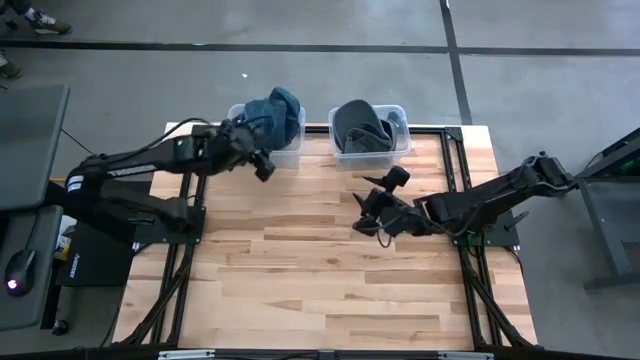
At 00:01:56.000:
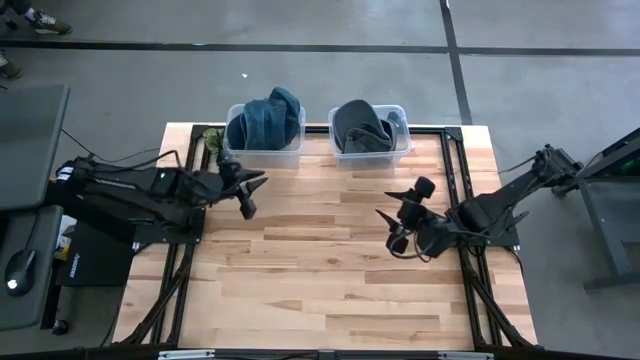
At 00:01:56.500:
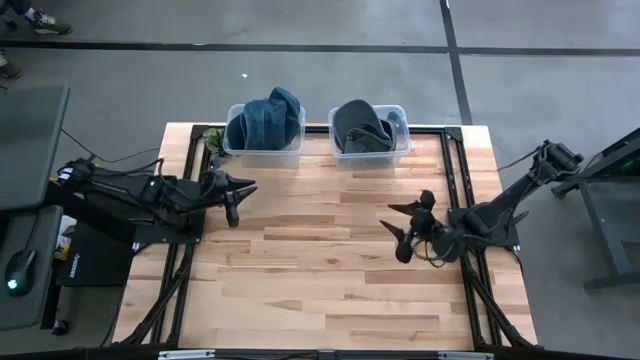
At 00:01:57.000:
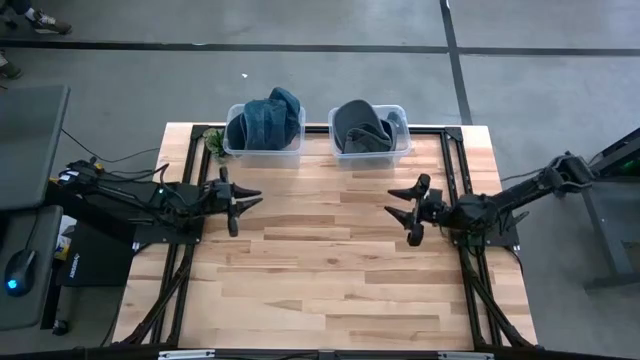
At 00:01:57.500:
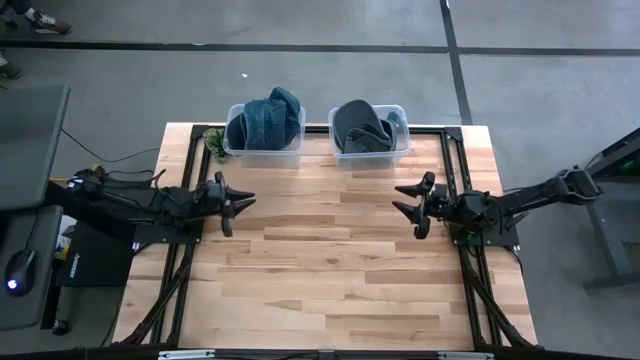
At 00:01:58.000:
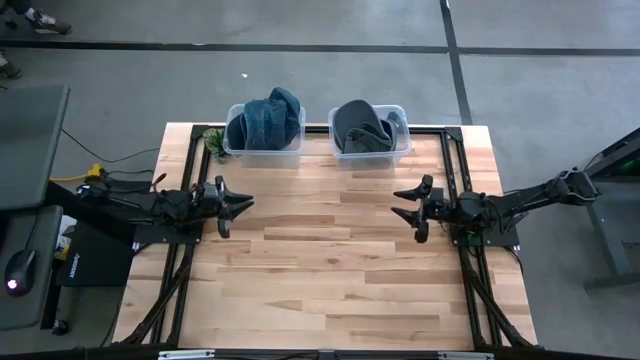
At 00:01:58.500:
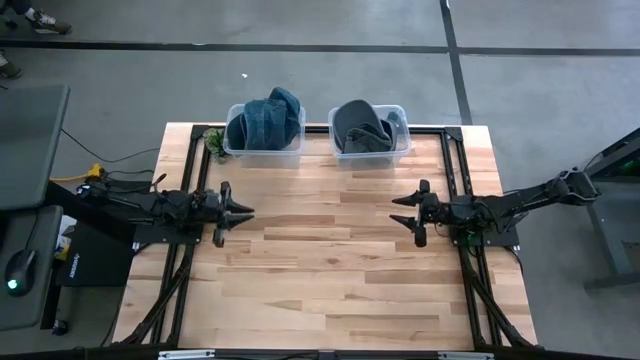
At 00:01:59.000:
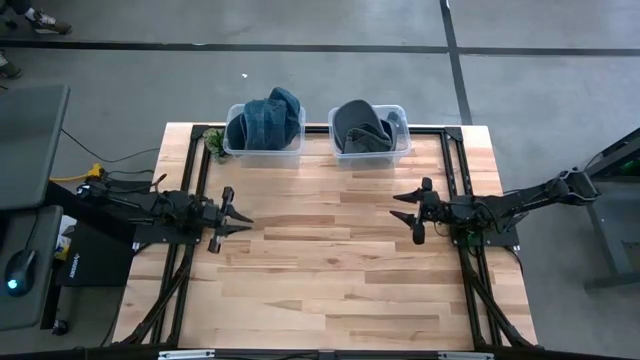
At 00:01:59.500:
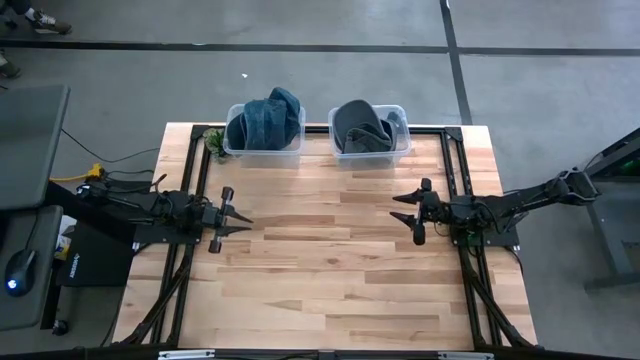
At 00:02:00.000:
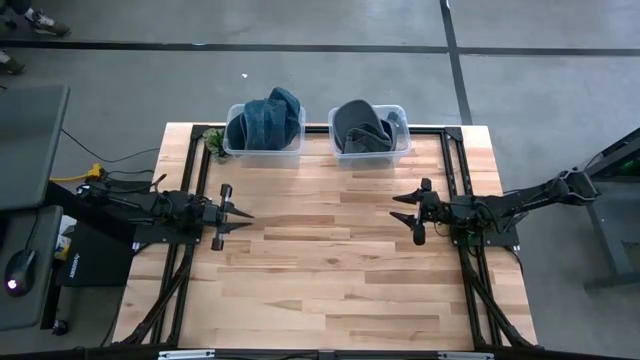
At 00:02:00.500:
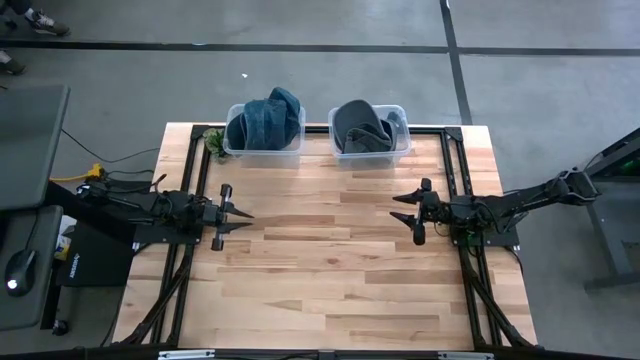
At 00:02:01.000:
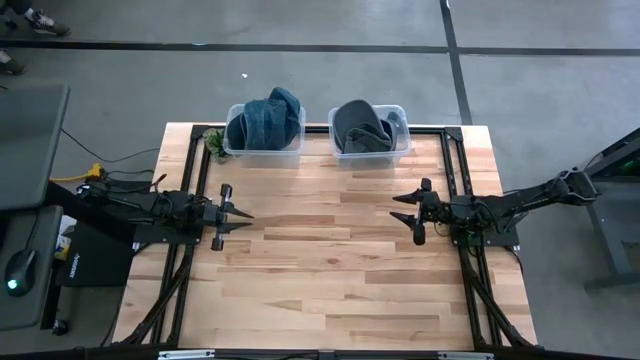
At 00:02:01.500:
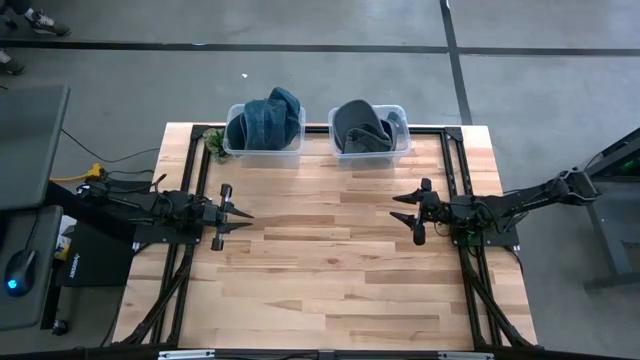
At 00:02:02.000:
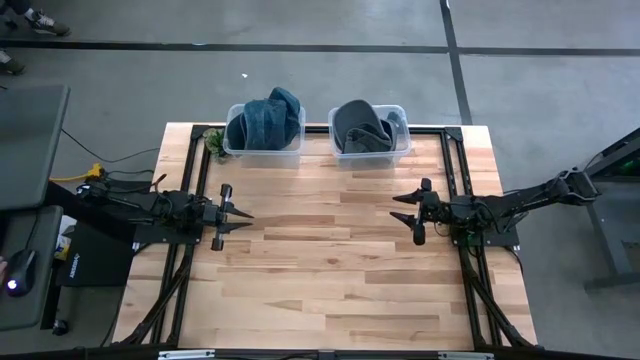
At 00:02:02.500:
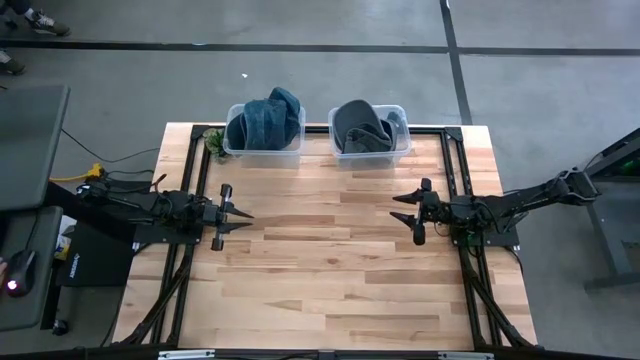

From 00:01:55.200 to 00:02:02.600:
Task: Pick & Place hat
Return to home position

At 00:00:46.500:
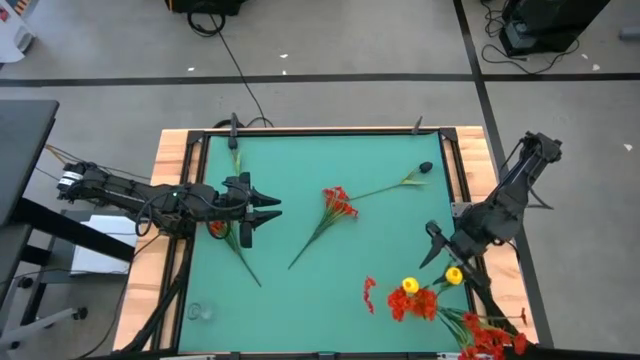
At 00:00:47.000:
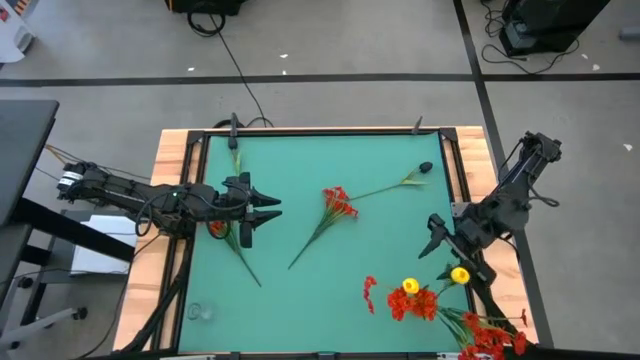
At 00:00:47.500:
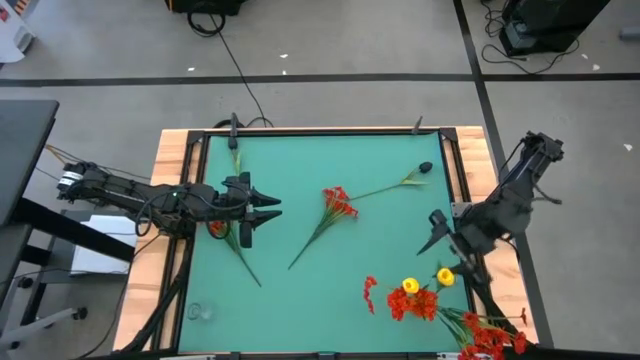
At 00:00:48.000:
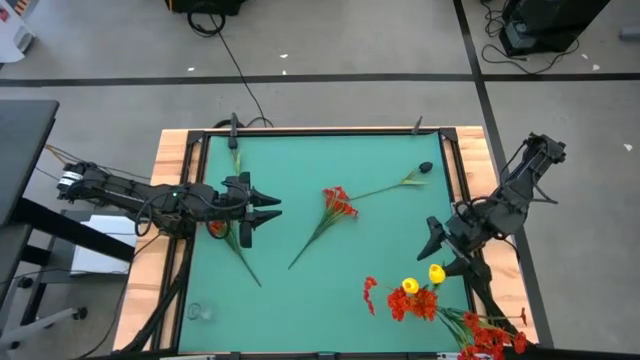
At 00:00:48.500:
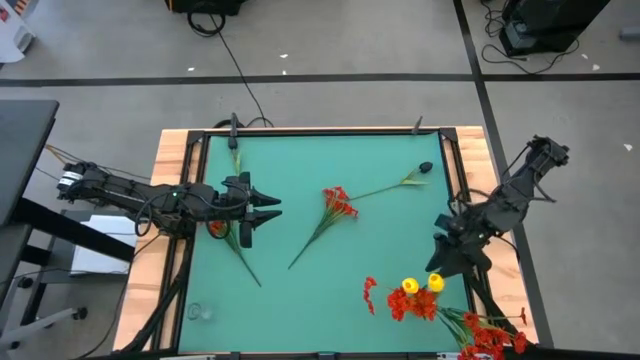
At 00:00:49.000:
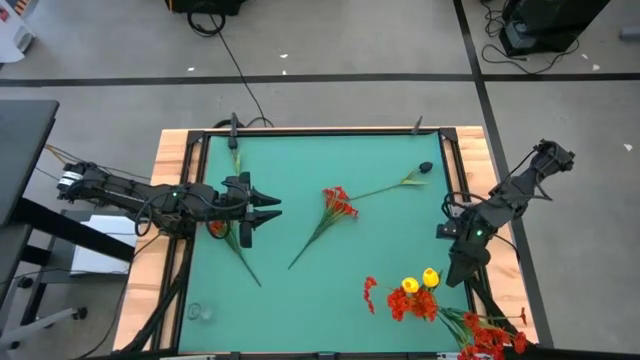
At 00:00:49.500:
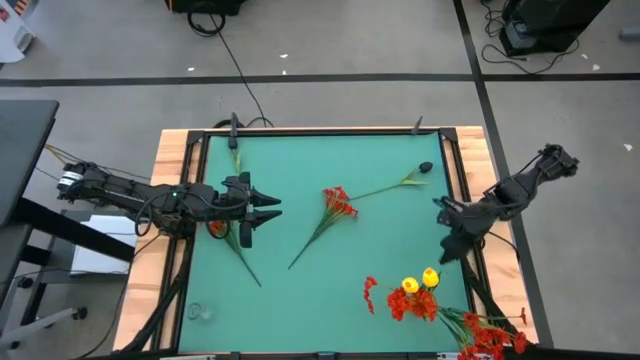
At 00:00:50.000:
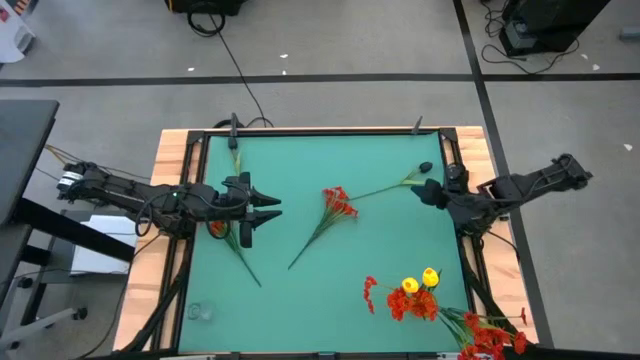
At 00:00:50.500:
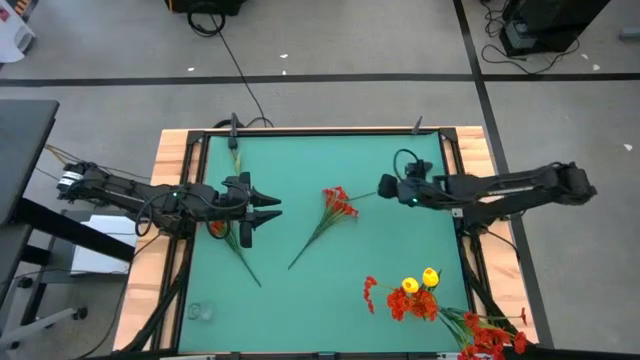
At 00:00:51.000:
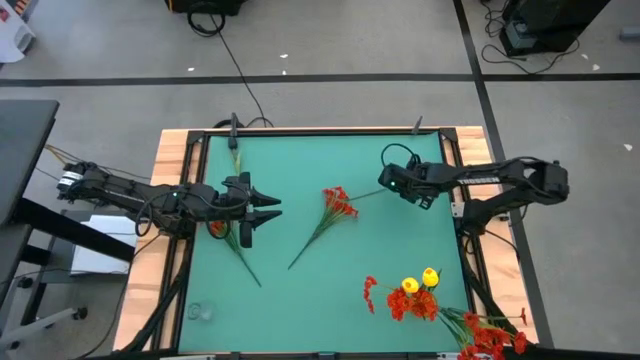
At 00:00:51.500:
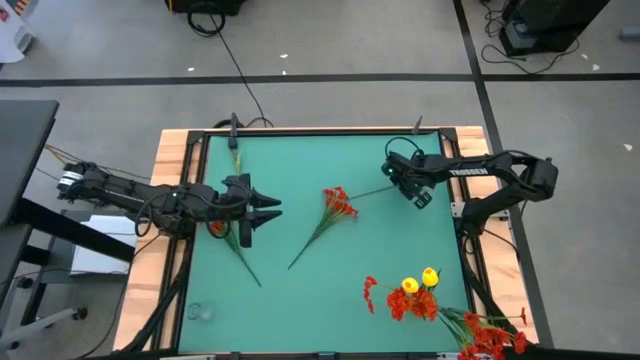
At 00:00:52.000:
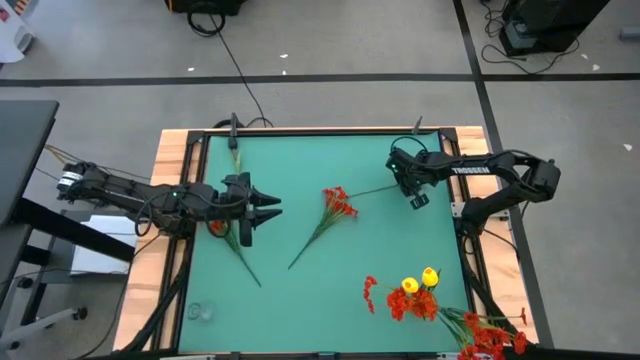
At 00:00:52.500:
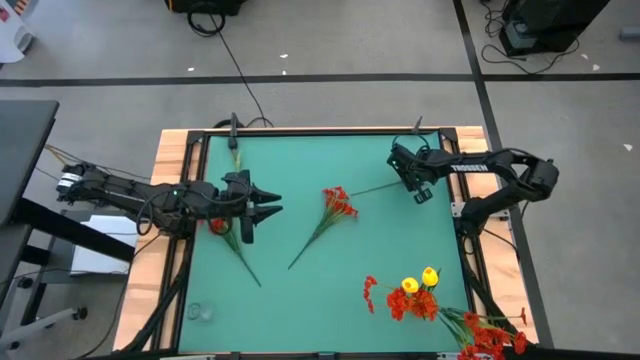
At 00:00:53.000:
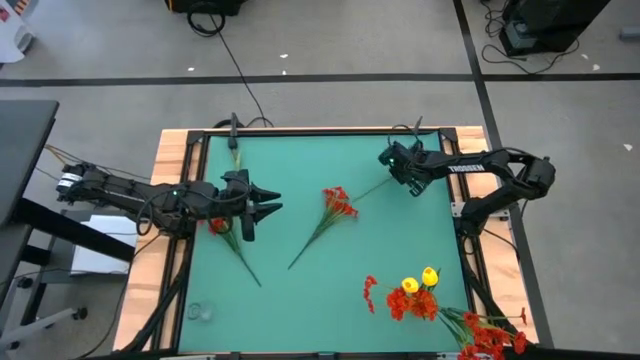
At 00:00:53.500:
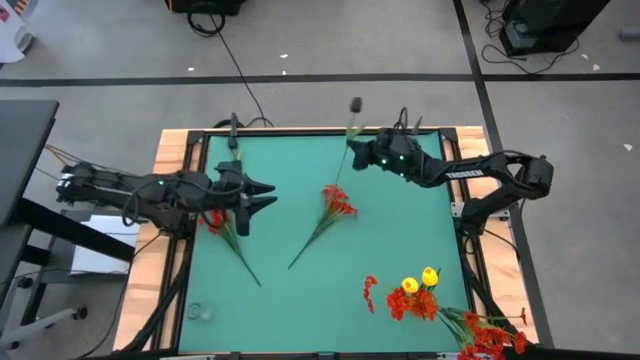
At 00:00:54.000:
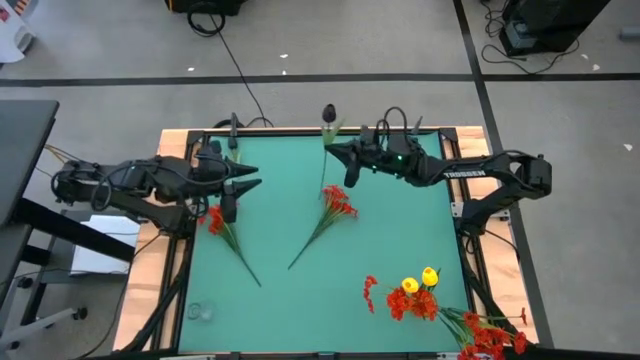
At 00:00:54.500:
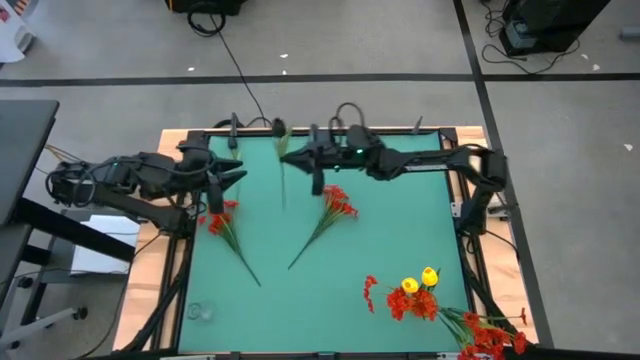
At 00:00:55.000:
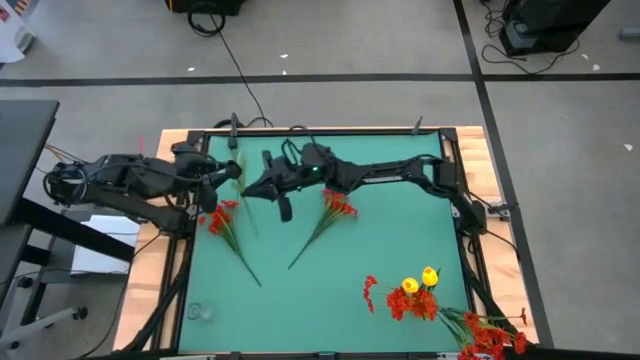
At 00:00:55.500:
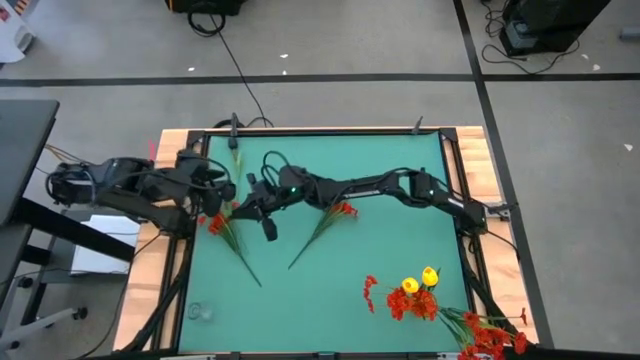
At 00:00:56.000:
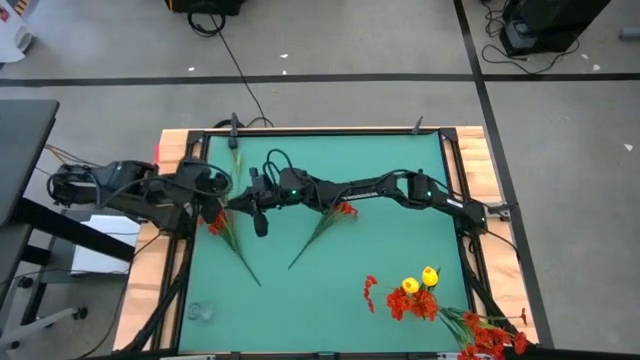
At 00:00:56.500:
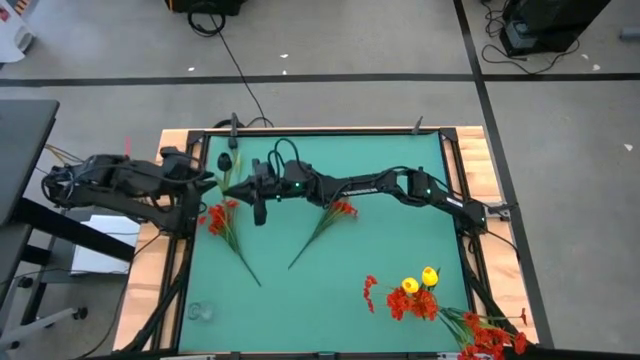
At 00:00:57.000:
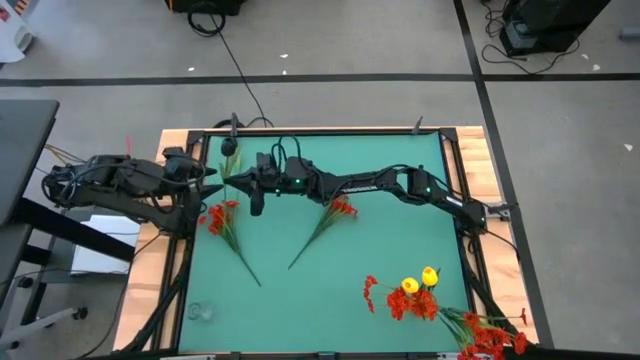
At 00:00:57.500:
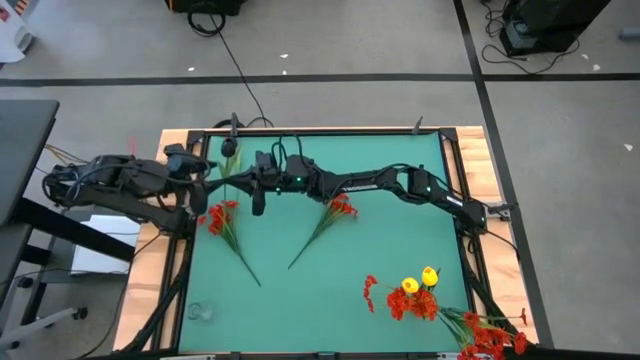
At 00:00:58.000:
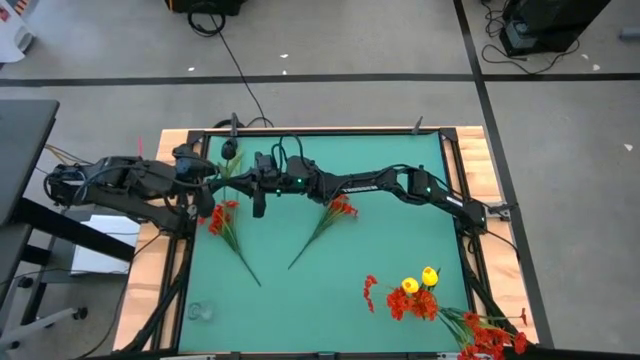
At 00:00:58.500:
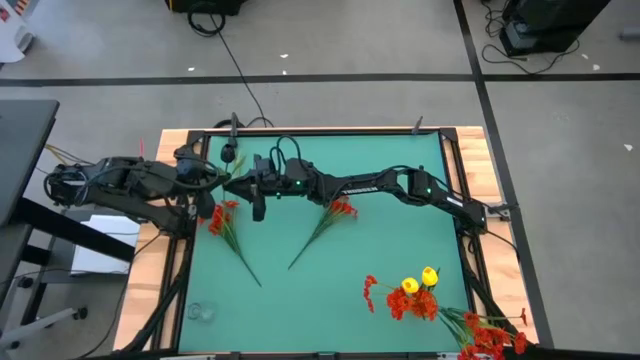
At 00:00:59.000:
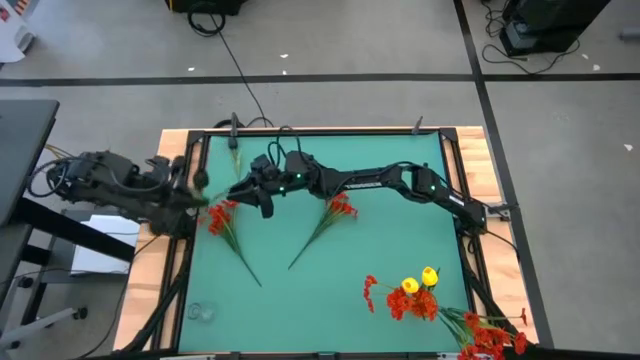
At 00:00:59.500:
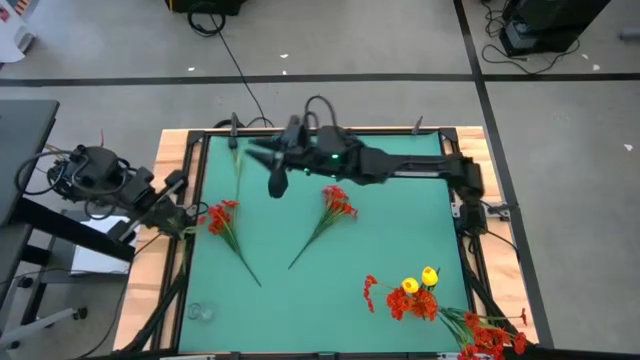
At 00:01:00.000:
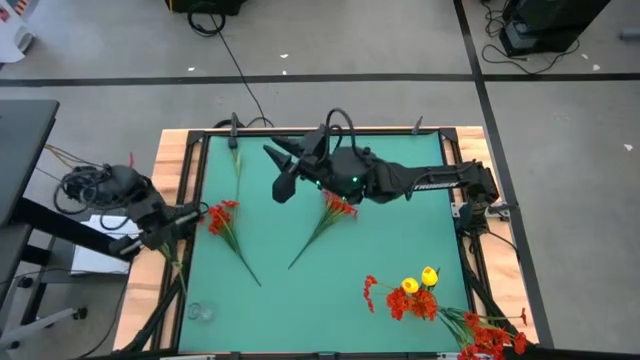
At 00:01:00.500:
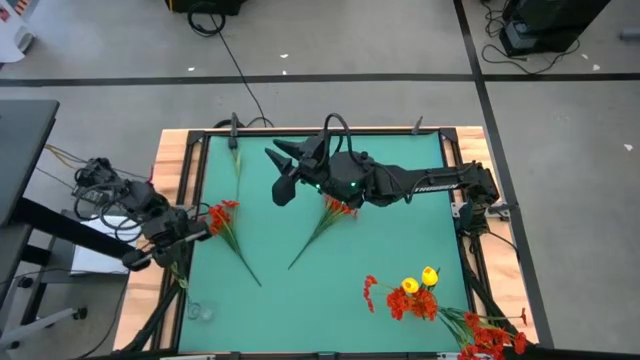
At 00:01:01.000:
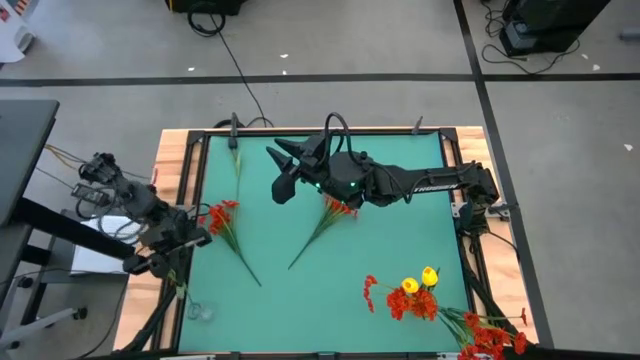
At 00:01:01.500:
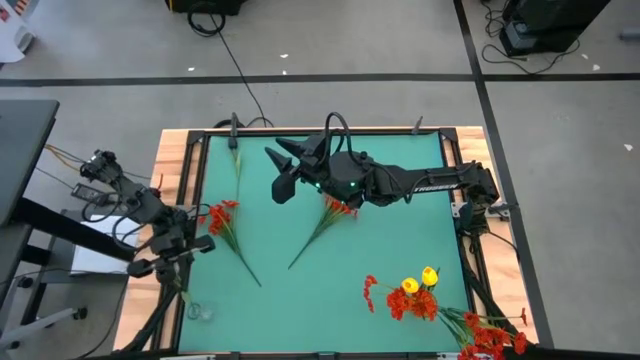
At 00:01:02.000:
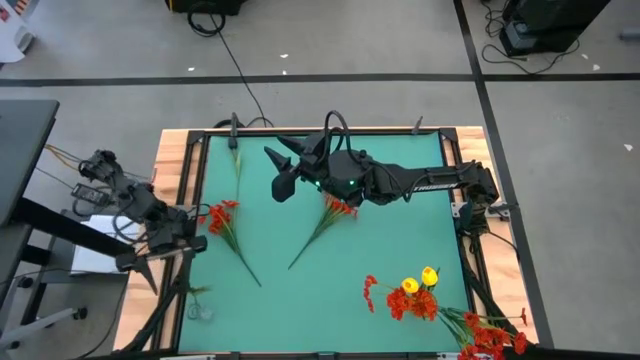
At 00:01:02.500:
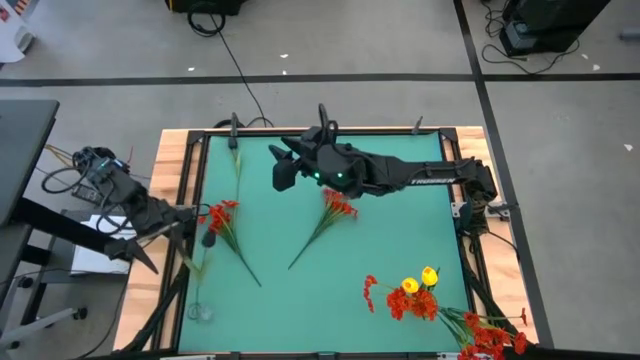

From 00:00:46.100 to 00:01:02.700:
Task: Sort flowers into vase by color
Put the right black flower into the transparent flower vase
